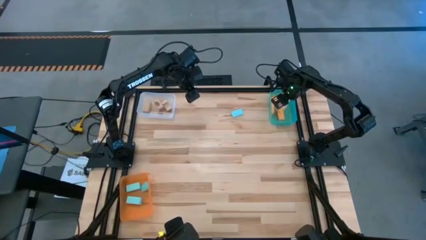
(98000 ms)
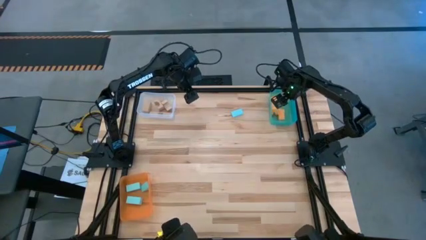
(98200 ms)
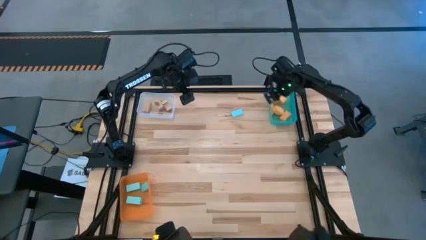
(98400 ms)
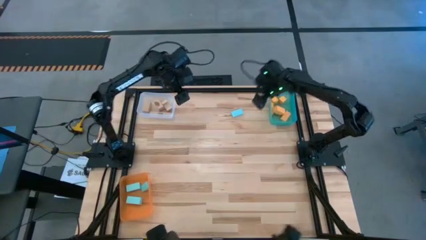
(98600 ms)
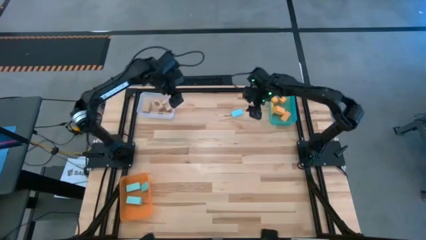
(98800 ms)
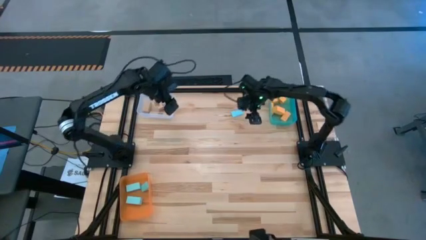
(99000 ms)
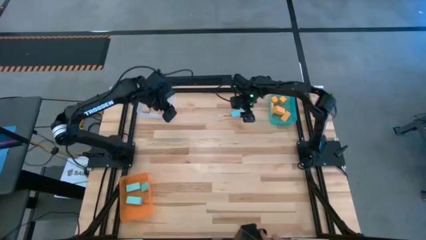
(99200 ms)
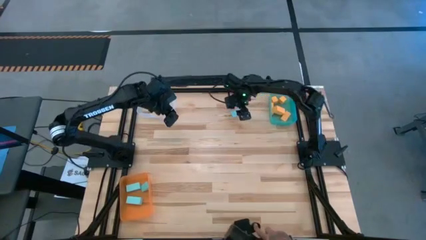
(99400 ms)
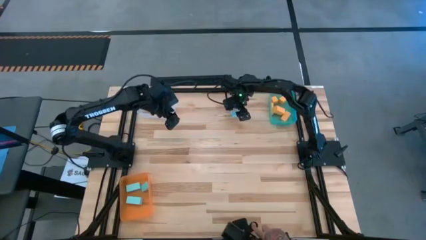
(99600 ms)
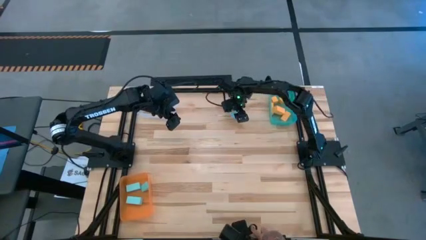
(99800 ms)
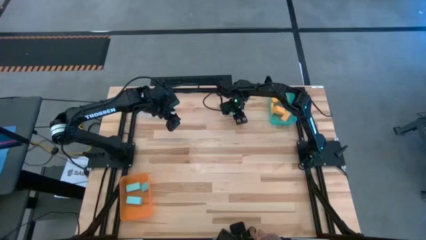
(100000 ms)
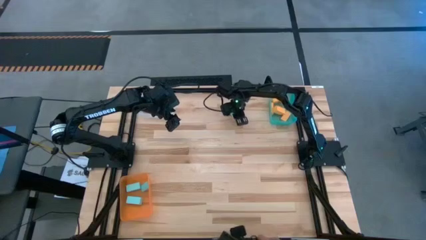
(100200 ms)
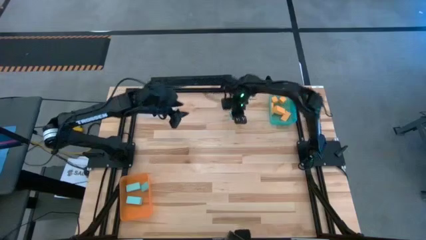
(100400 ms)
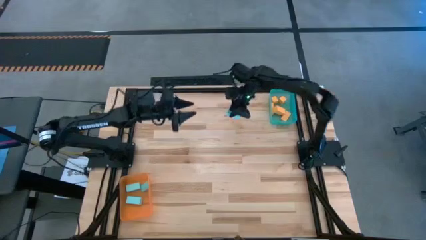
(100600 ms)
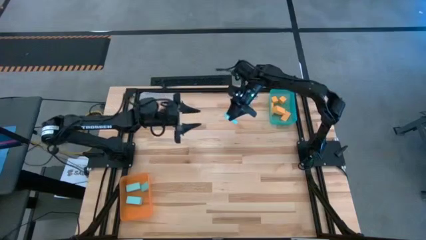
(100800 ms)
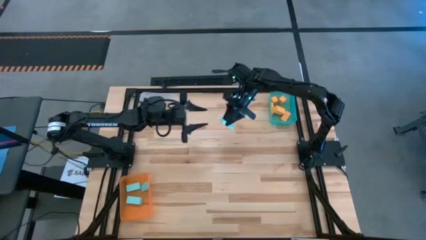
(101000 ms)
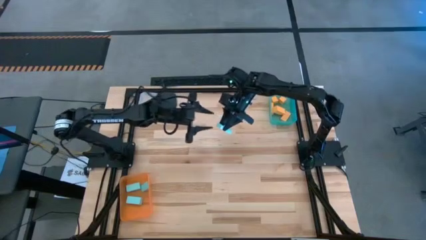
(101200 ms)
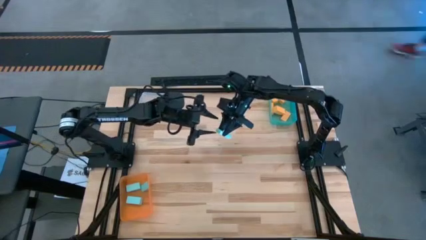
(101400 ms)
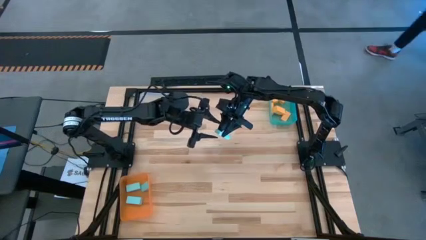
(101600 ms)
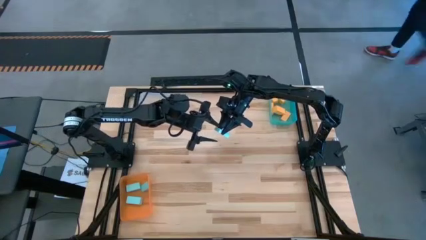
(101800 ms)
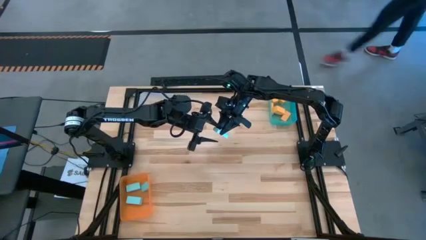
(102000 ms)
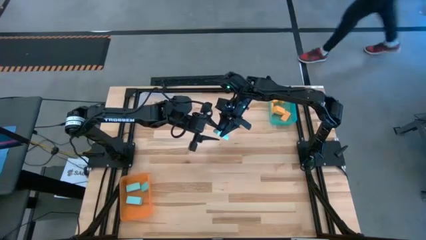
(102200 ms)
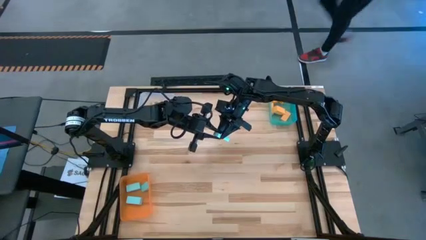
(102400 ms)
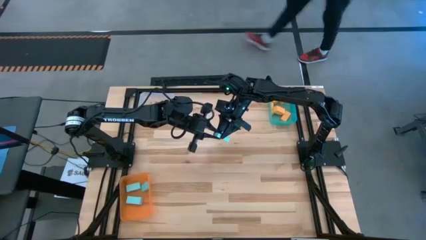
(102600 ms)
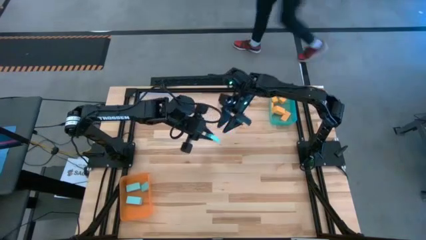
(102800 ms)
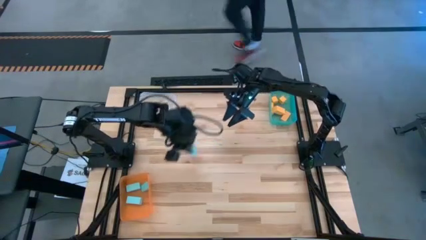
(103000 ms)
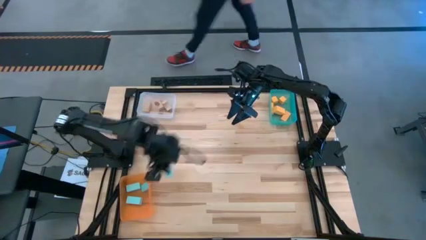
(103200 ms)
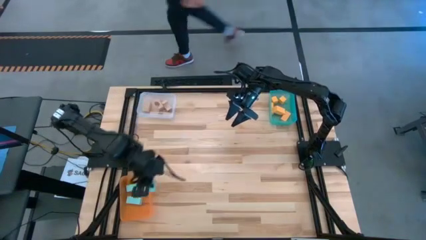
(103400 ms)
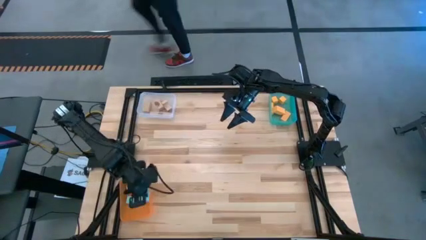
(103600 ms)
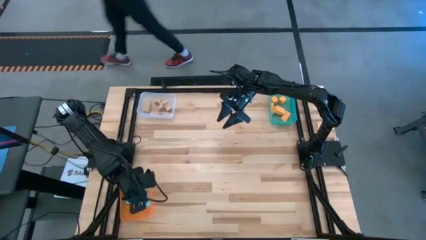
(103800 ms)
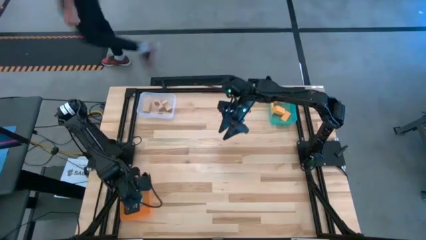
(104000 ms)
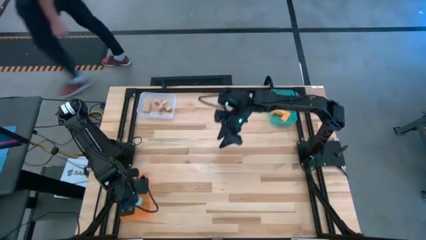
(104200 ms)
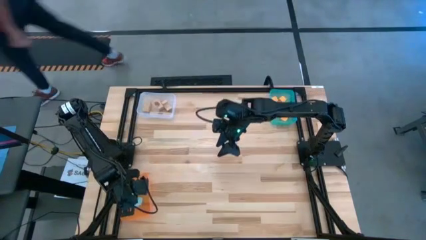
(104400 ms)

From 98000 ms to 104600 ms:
Task: Sort & place blocks by color
Put the light blue block into the orange bin

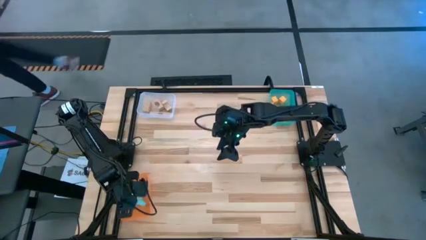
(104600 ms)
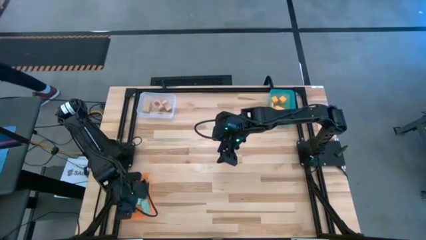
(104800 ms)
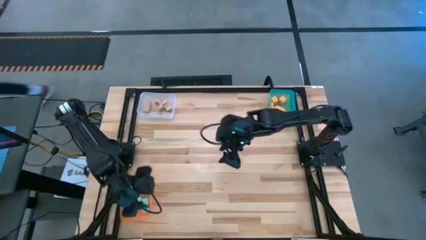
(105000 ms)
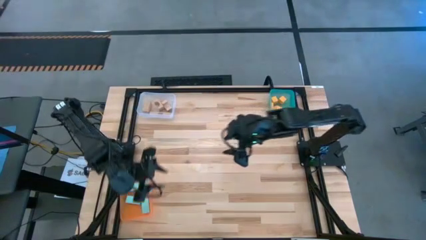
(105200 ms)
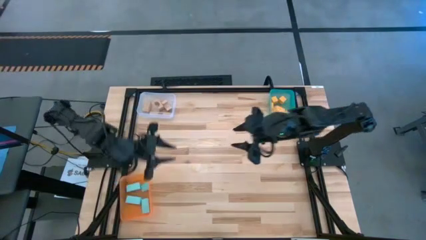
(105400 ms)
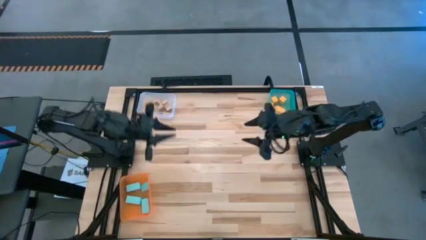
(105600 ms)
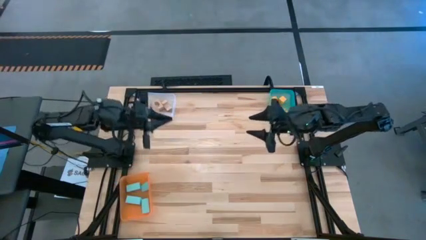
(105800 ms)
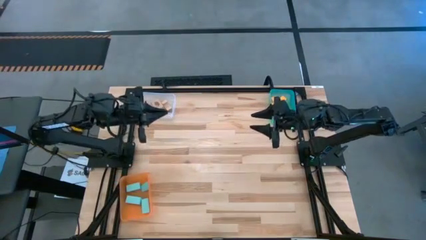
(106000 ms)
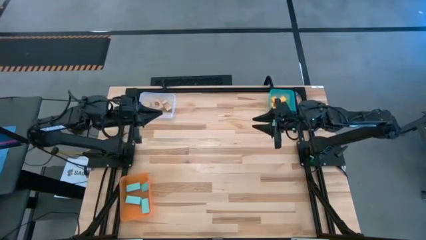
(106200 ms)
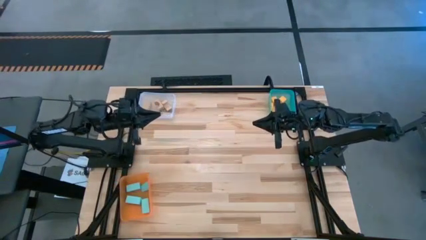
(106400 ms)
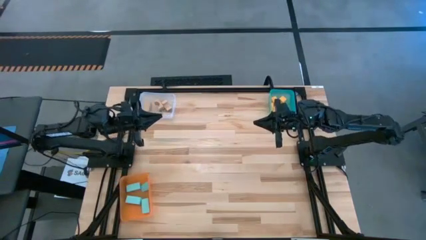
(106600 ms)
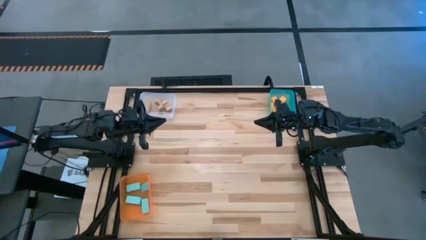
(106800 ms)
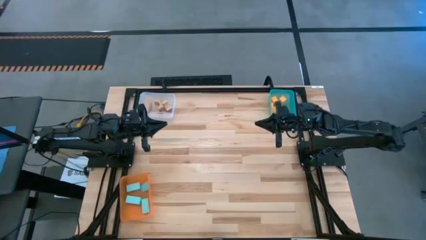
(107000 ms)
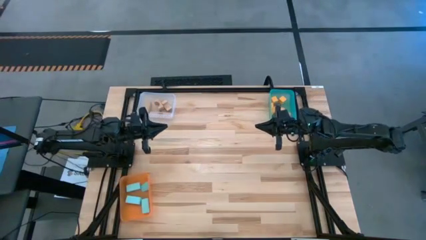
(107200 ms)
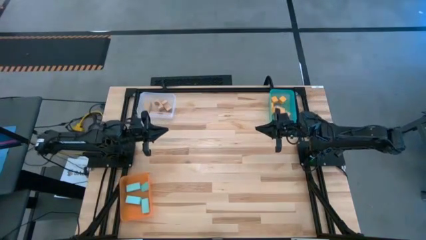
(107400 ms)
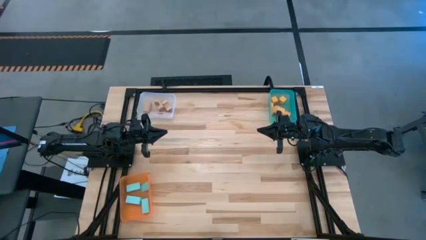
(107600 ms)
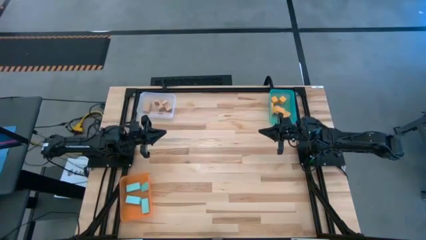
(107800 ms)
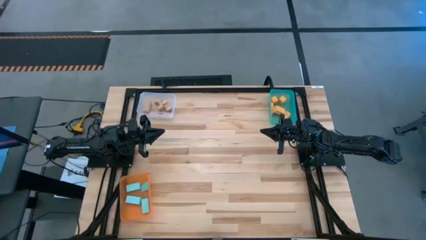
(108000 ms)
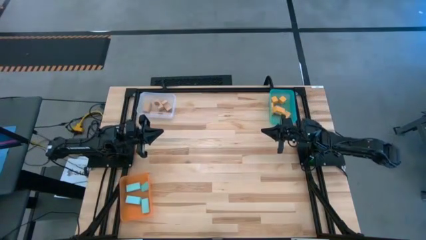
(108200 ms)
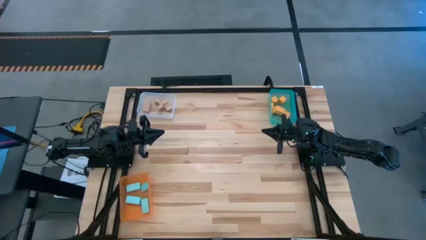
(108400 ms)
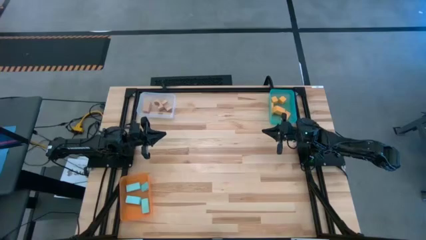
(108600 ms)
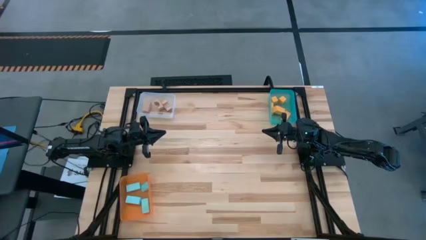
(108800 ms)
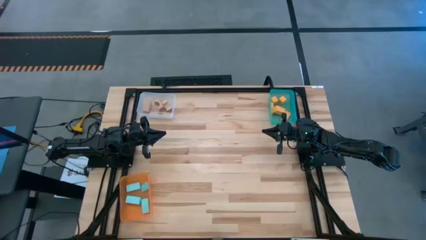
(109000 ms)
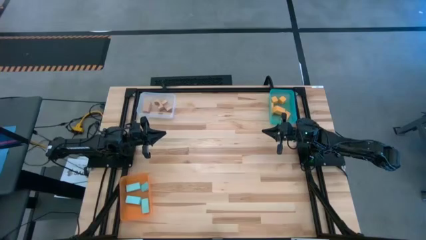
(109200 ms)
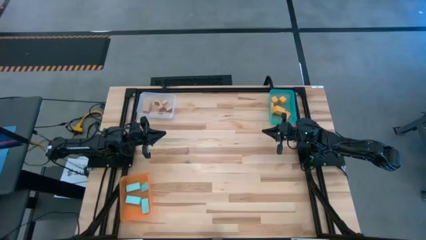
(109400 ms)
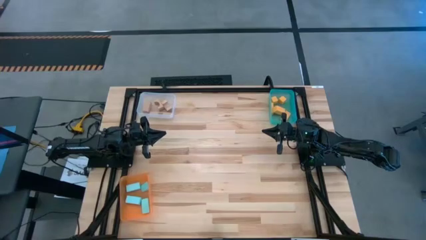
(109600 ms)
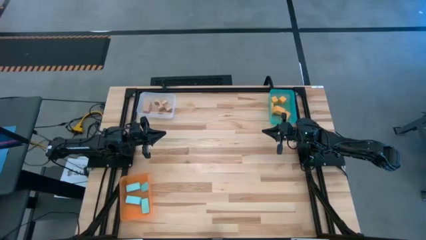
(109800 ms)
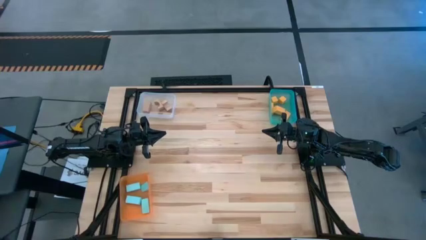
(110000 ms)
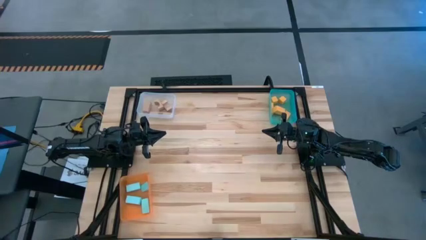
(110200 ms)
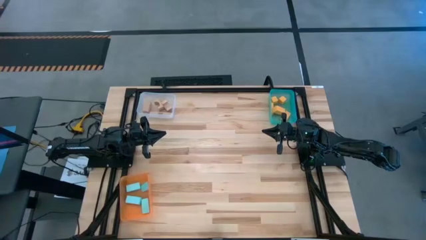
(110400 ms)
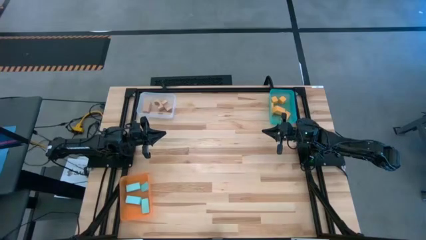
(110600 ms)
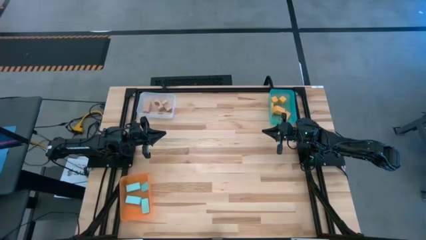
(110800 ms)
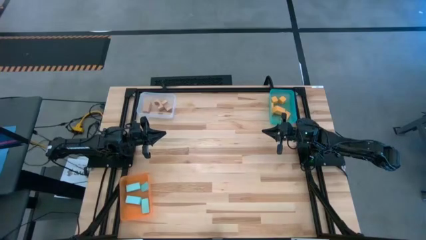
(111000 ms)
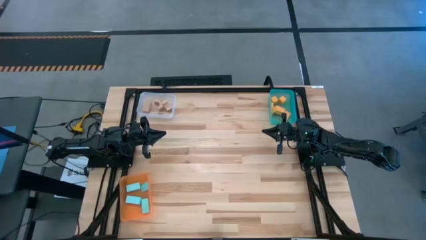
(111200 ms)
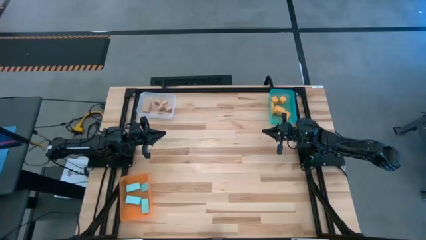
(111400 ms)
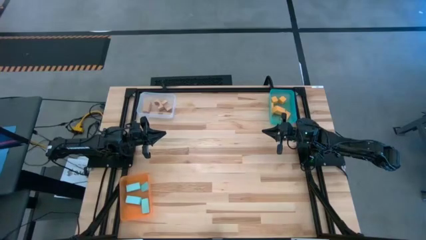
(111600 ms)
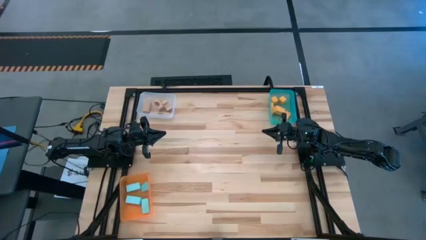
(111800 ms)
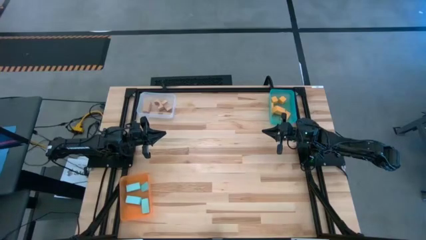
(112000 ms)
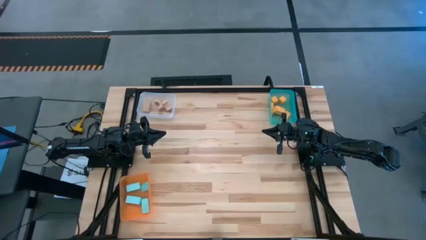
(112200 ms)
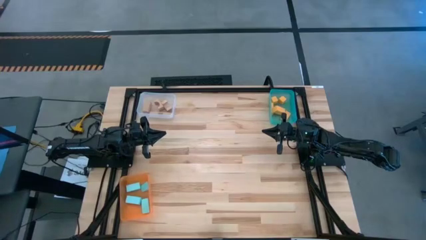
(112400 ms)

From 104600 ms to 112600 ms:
Return to Home Position

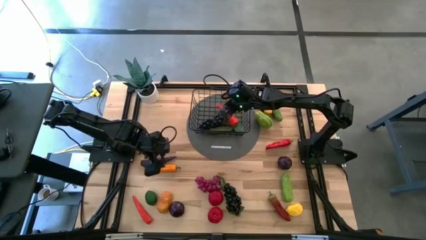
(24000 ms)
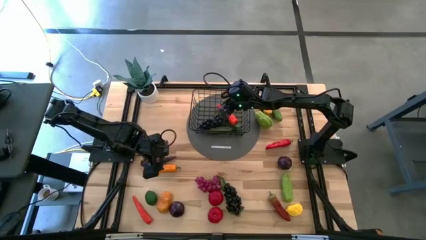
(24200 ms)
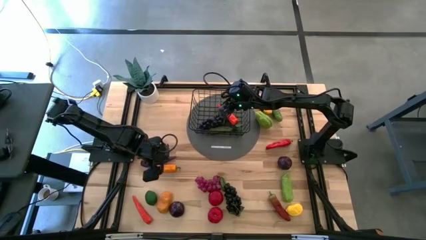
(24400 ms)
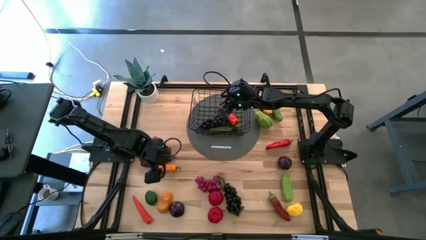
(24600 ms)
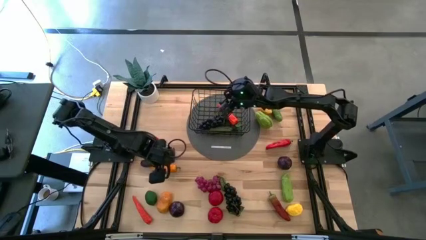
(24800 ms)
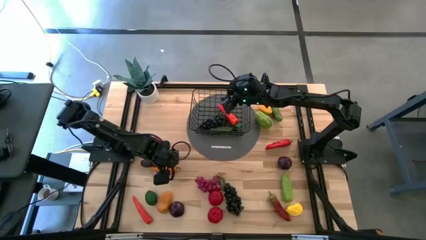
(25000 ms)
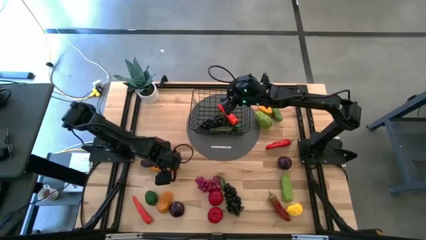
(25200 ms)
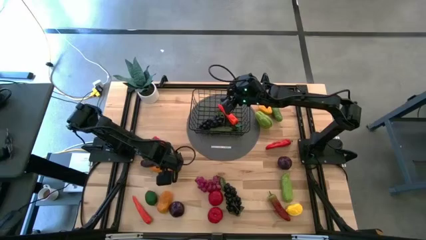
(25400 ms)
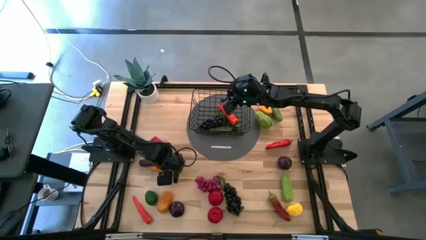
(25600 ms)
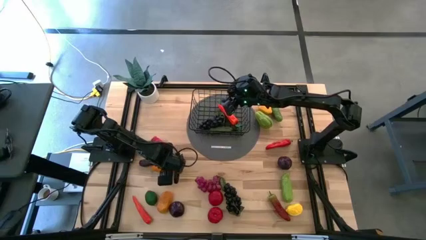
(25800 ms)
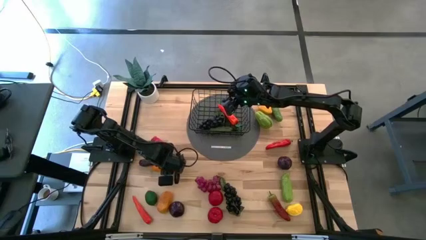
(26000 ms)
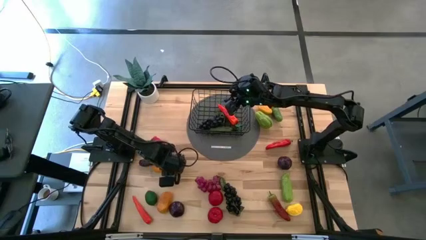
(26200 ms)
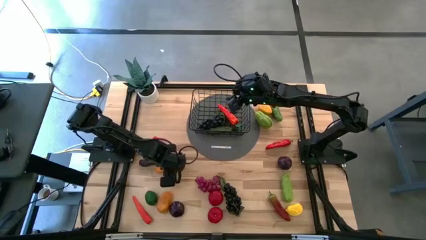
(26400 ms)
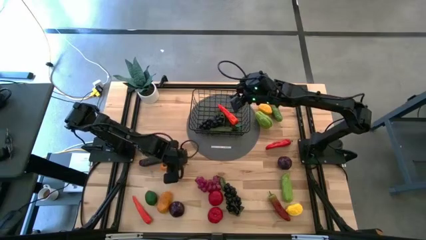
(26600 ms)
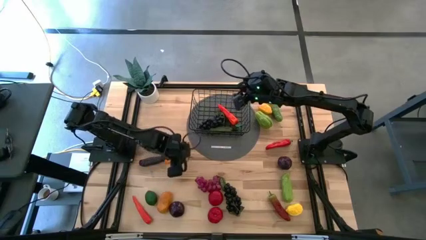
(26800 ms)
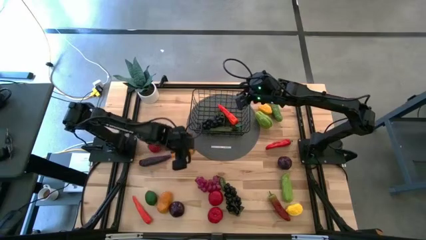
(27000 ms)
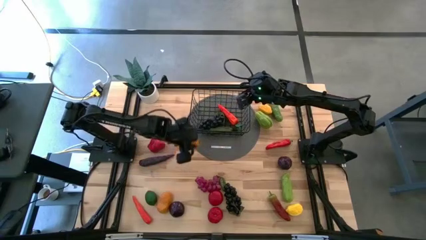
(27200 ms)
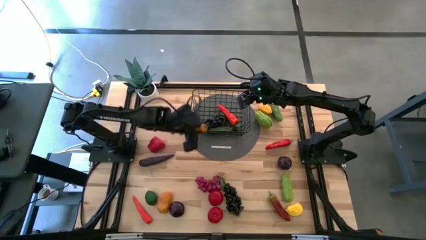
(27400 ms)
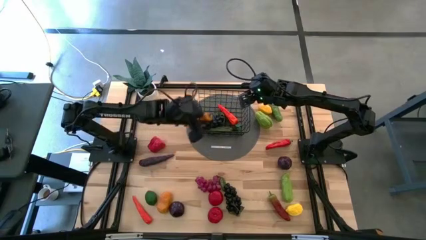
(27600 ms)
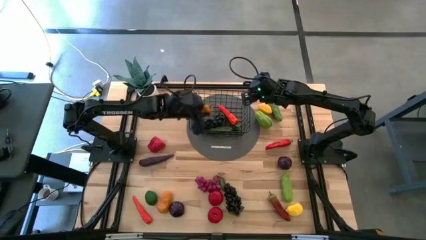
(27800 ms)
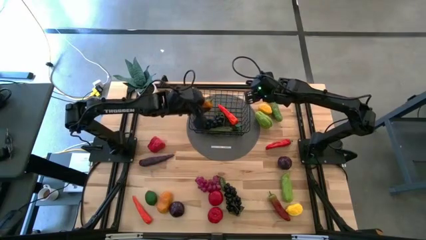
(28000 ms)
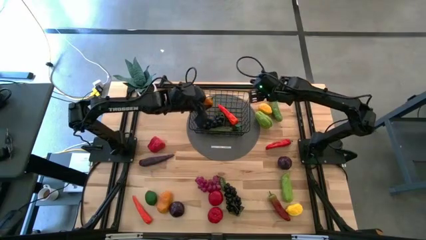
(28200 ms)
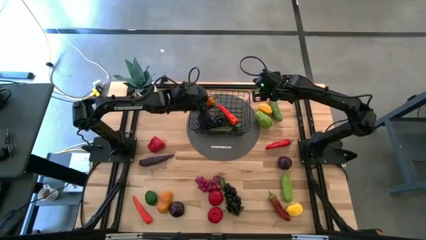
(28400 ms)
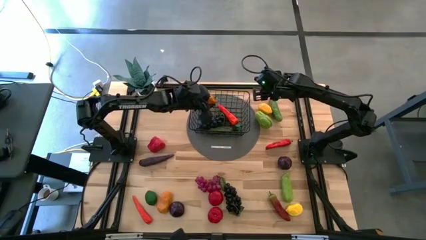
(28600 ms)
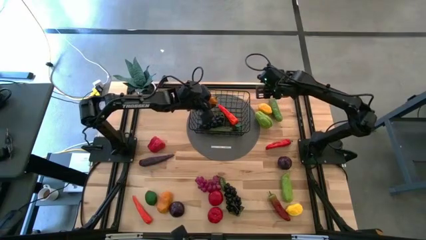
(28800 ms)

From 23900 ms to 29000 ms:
Task: Build produce basket
Put the yellow chili pepper into the wire basket
